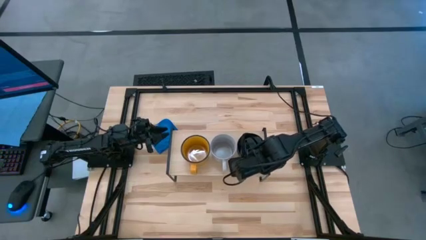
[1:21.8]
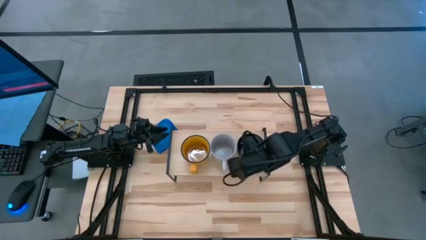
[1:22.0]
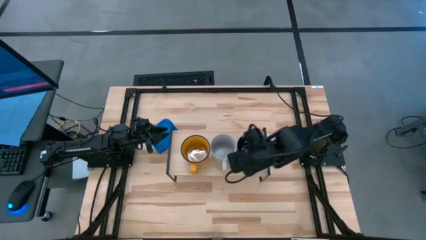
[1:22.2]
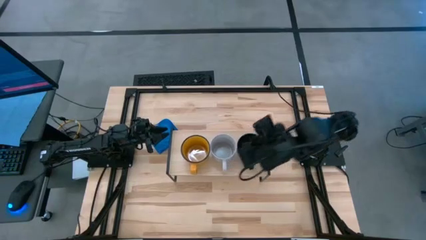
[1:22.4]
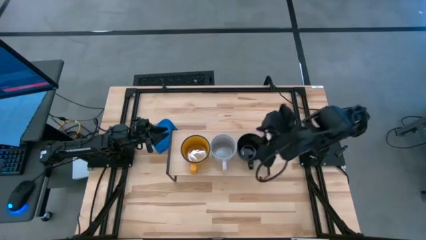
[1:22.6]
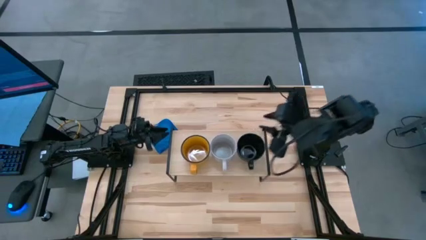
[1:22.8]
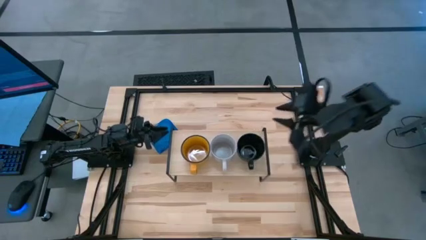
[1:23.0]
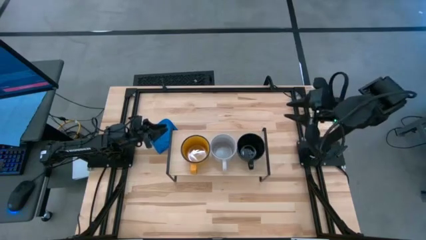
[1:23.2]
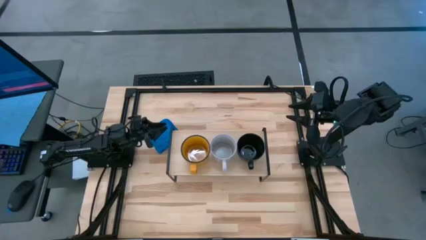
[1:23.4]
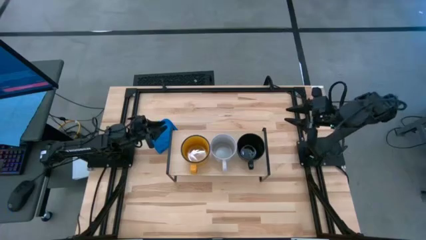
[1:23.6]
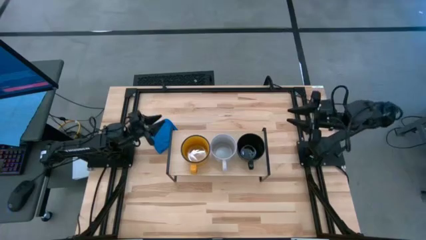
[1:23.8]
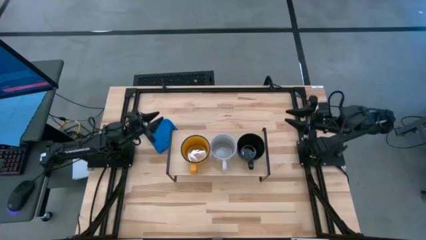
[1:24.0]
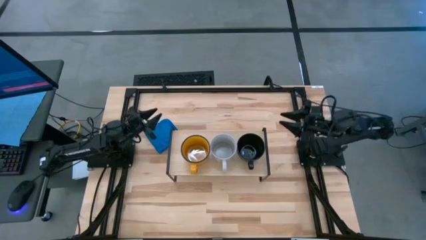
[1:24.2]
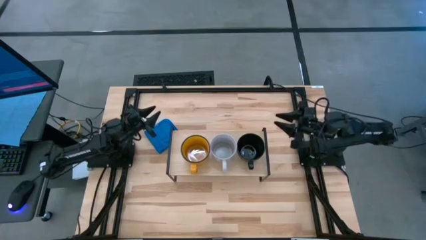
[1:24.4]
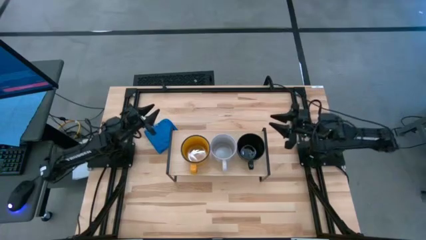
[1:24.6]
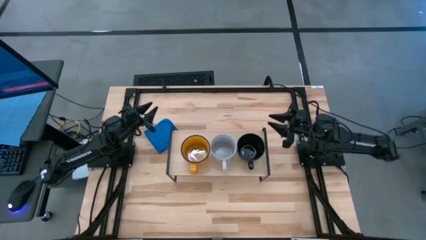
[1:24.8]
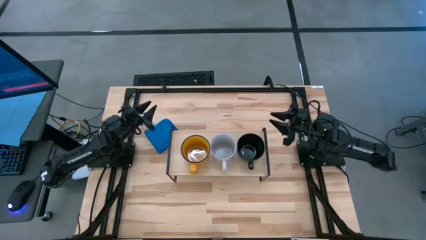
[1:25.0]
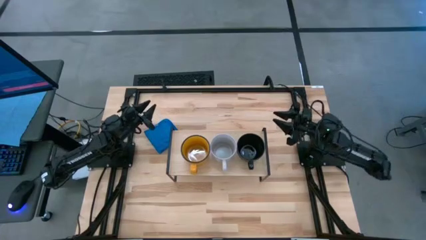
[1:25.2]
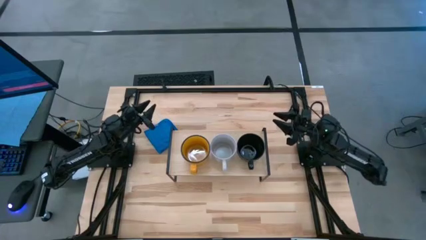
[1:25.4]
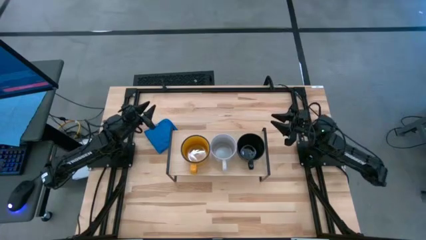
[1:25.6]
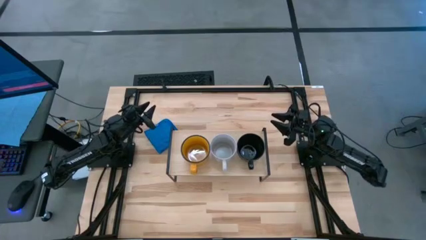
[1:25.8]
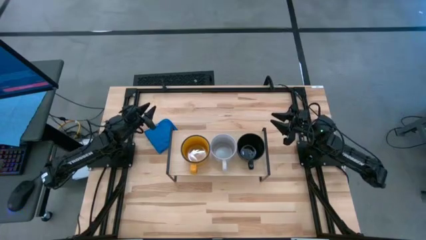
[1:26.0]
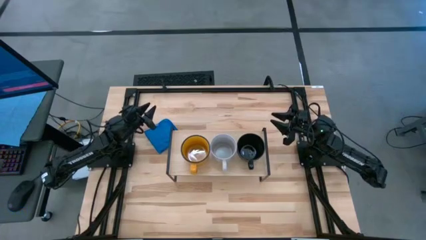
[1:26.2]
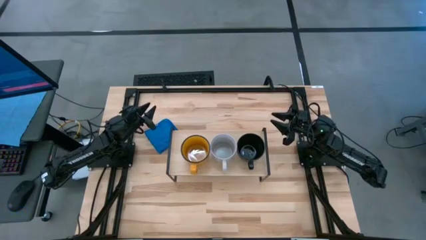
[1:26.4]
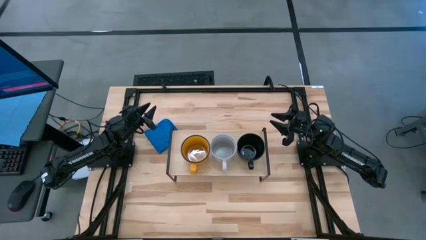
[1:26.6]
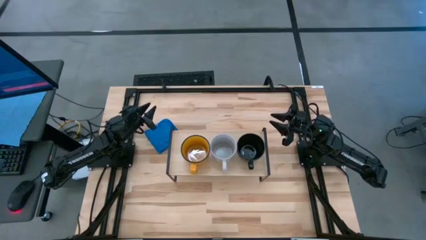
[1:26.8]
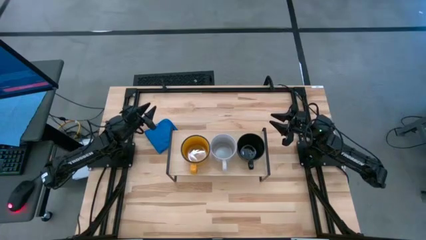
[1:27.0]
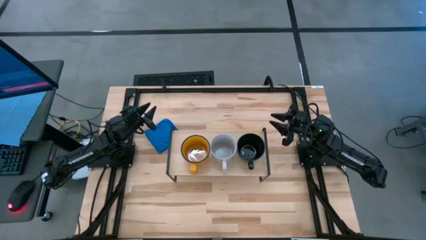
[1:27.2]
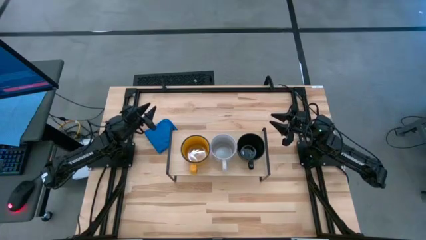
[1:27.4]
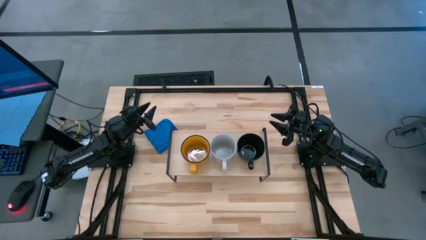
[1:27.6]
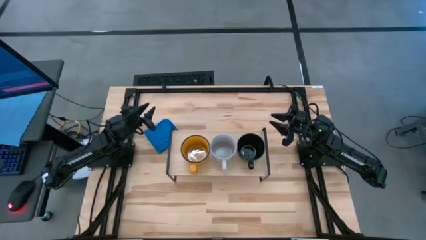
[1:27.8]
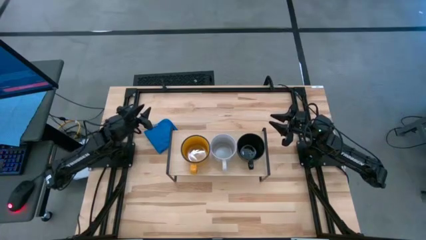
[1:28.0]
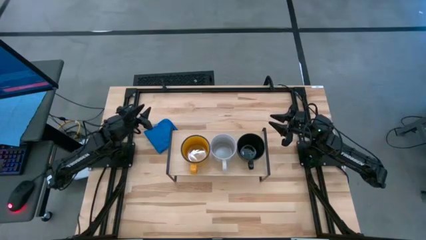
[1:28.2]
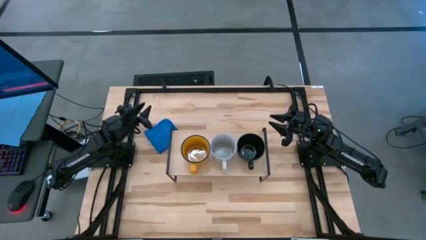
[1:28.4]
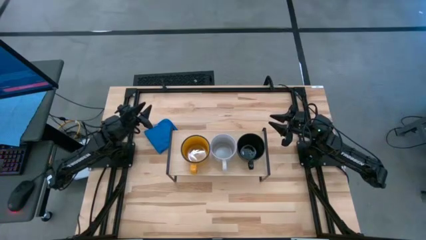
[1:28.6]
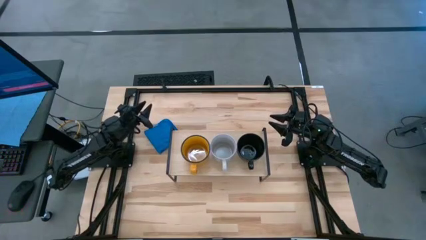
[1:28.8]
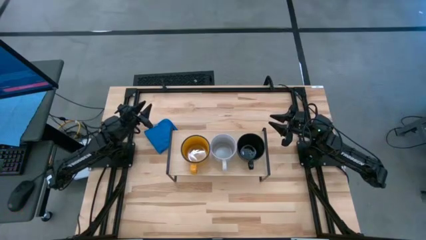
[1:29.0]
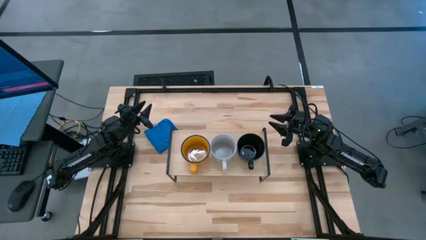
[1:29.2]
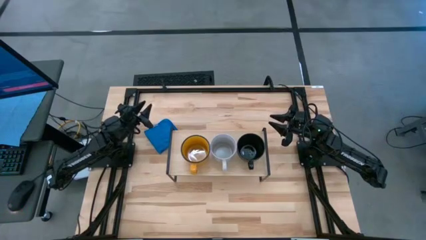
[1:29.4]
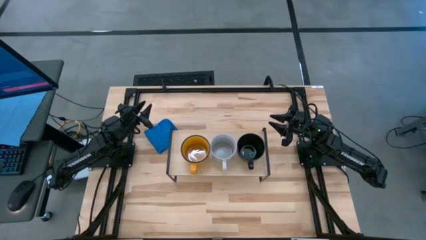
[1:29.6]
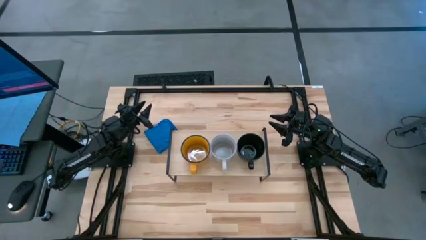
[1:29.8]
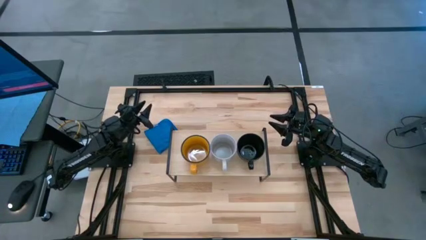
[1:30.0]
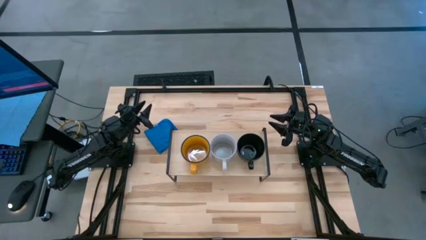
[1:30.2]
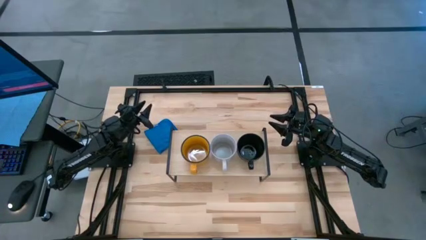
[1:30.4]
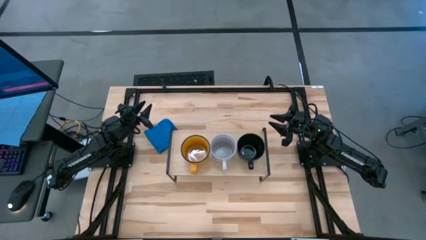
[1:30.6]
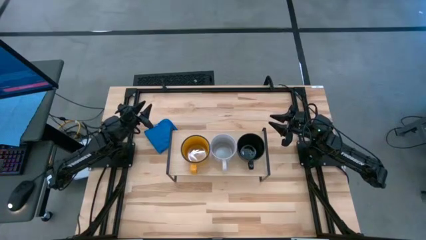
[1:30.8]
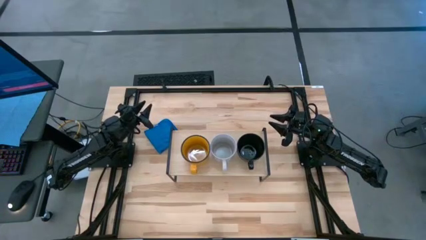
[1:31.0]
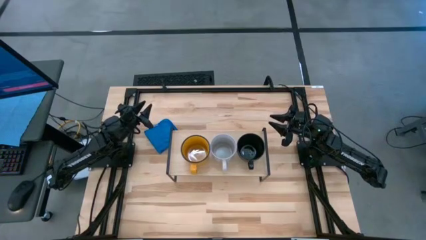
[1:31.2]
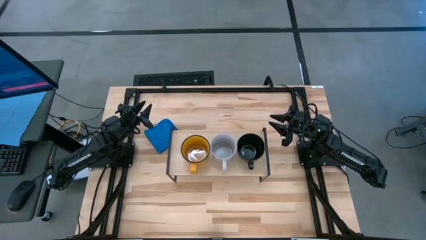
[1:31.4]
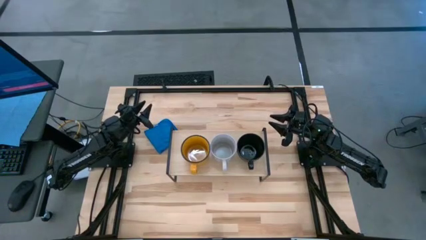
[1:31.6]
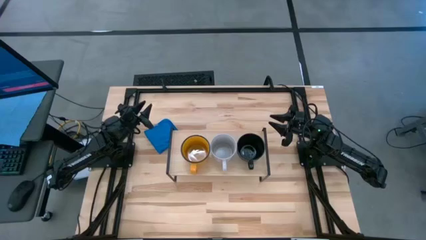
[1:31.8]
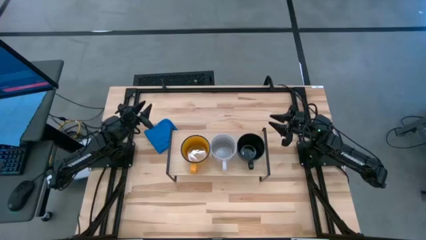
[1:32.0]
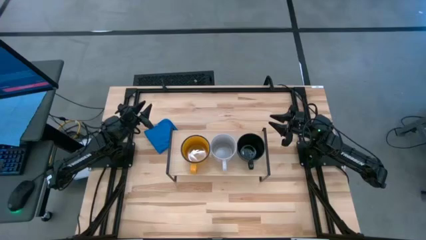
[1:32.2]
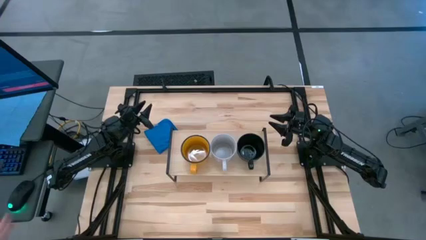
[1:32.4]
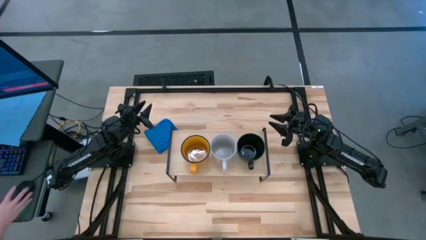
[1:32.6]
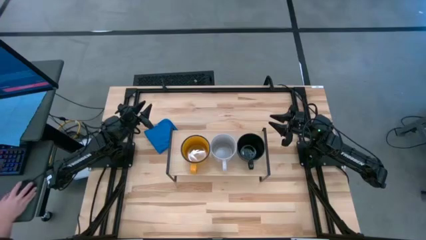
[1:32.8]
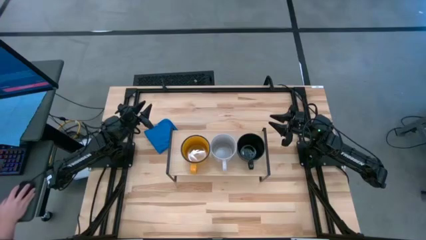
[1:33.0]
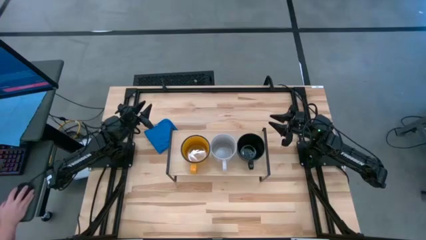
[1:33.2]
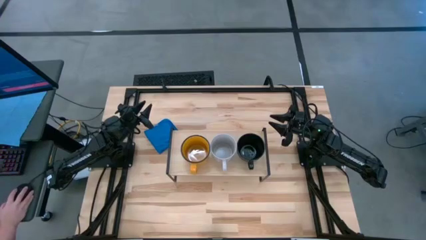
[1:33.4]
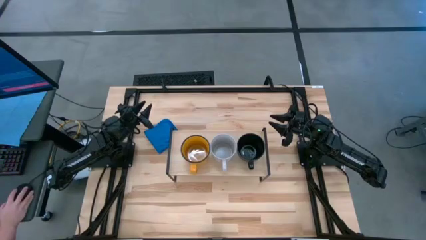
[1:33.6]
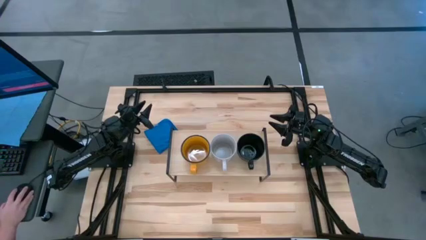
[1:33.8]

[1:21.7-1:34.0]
Task: Stack small to large cups/mugs on shelf
Return to Home Position

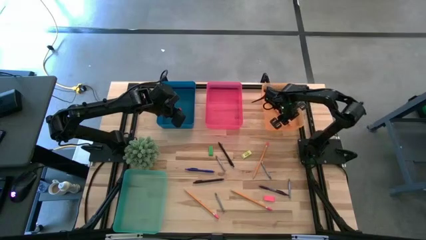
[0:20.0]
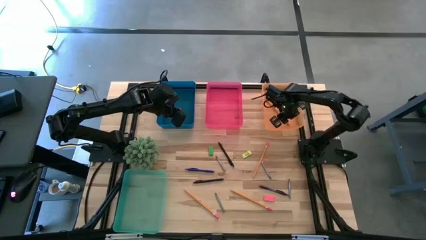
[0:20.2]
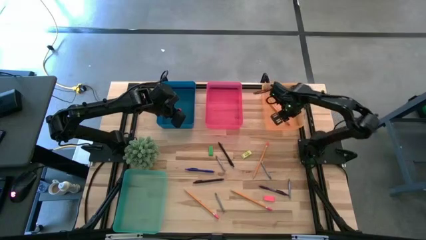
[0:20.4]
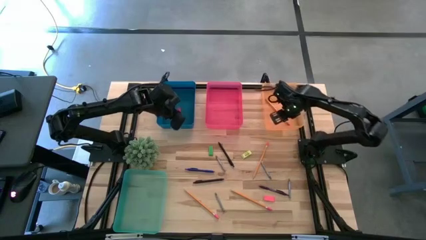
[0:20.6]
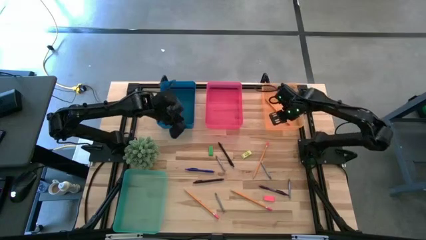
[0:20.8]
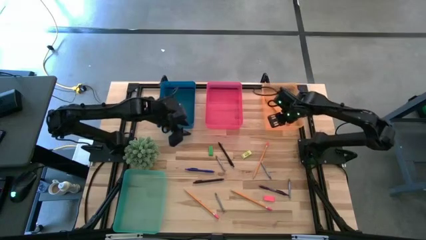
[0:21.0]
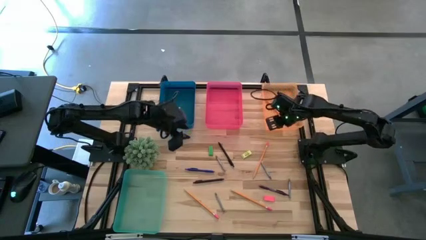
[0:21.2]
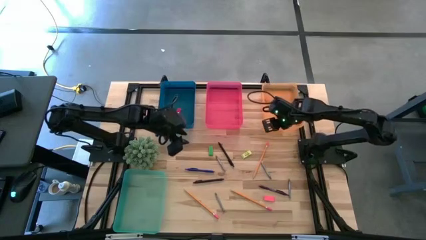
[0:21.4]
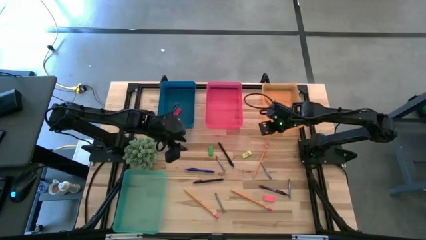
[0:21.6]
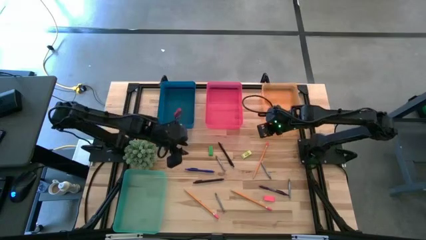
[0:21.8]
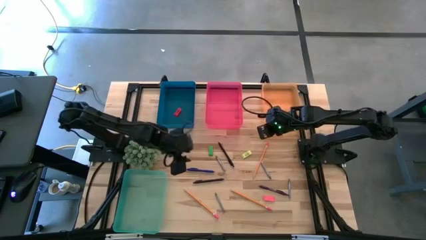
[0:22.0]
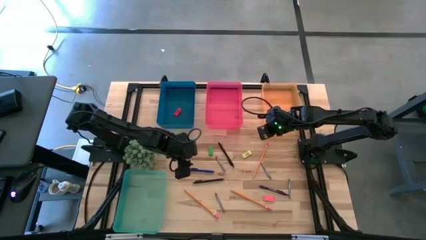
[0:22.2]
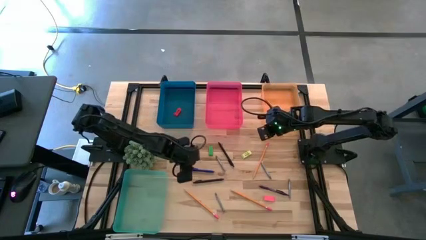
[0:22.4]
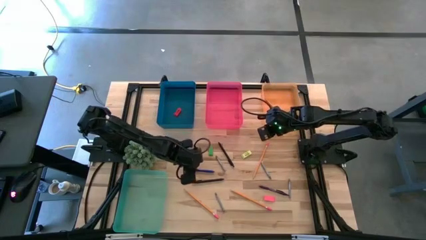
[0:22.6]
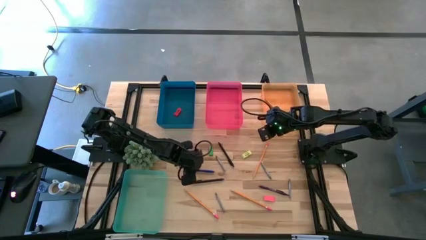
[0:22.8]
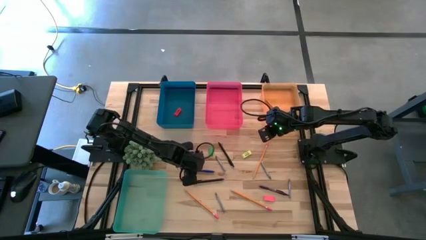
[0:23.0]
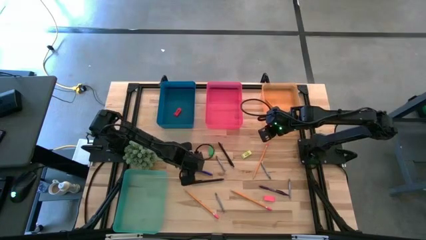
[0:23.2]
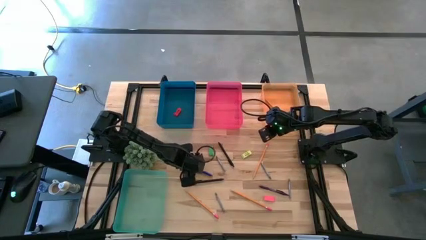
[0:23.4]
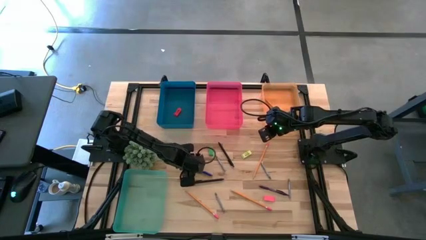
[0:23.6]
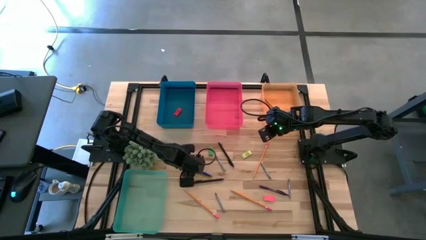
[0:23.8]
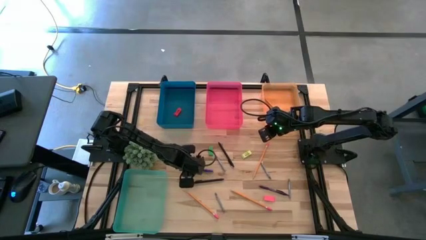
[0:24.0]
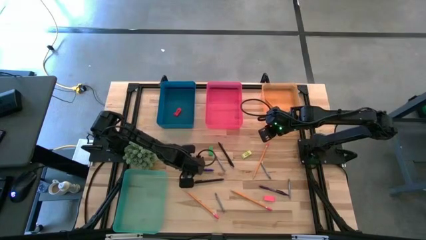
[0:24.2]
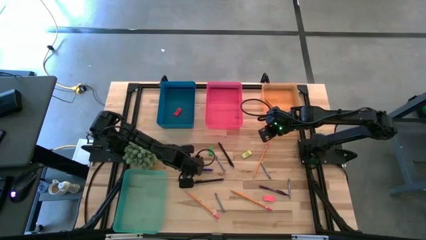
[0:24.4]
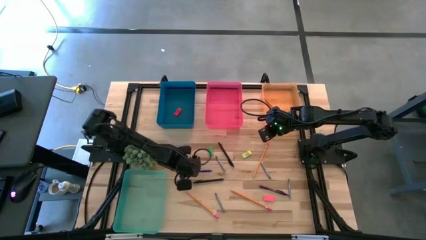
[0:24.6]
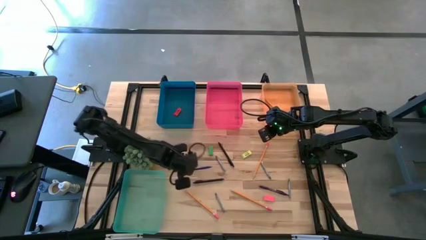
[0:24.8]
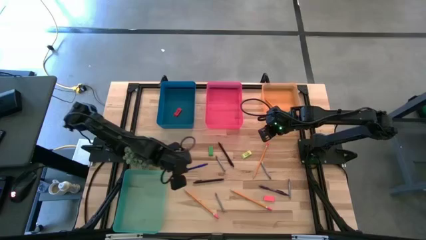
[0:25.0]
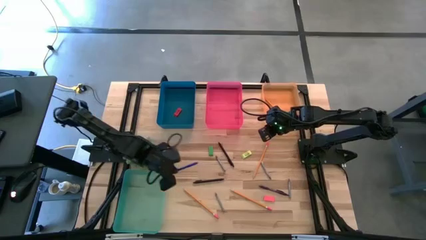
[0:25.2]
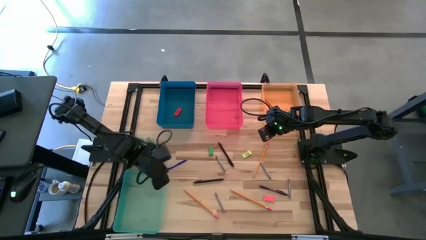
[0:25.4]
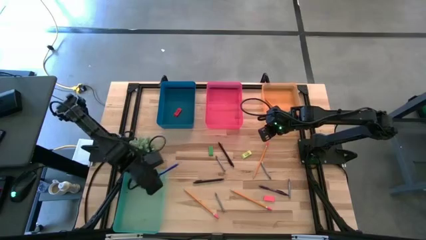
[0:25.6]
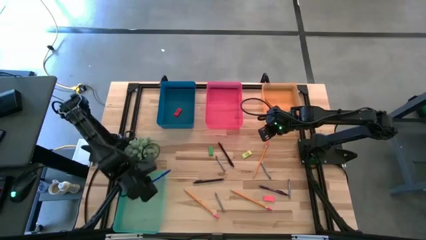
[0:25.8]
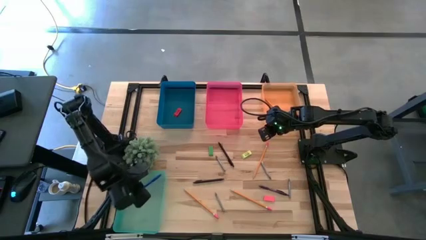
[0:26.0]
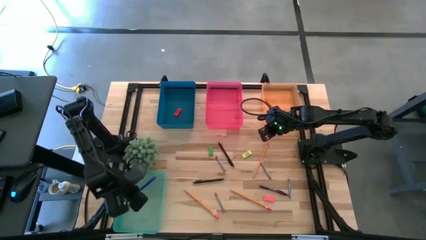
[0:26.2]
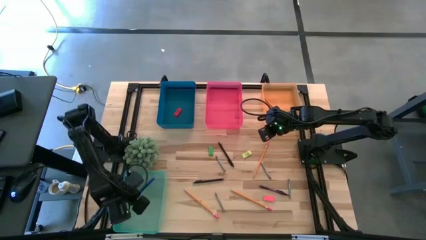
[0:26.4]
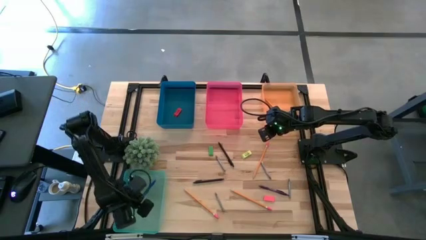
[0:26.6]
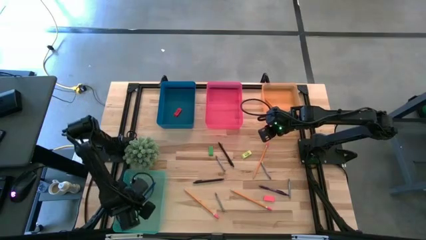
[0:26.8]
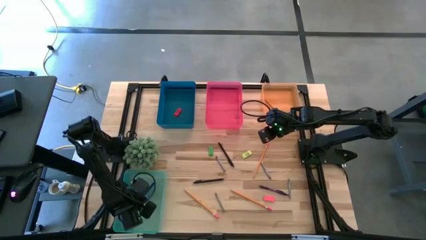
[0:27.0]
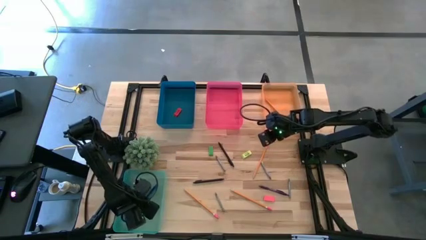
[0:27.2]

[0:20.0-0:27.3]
Task: Sort crayons/erasers/pens/pencils in bins
Put the blue pen into the transparent blue bin
